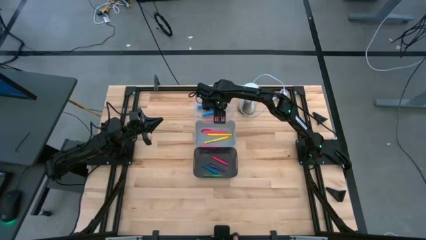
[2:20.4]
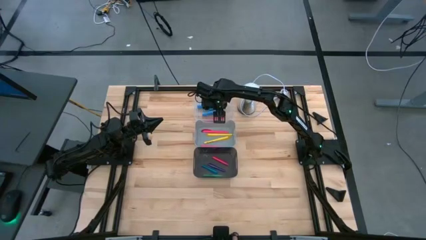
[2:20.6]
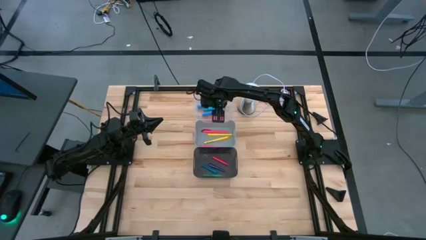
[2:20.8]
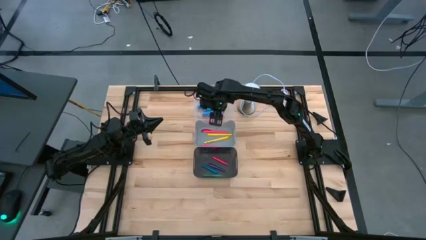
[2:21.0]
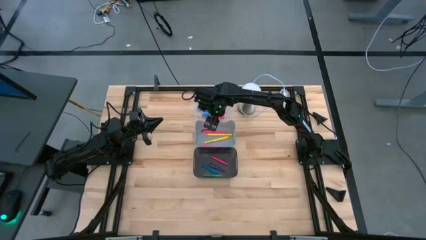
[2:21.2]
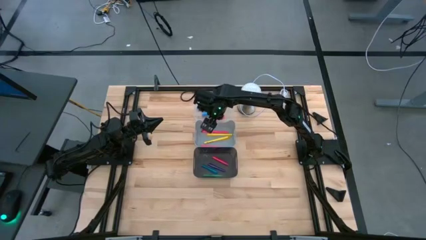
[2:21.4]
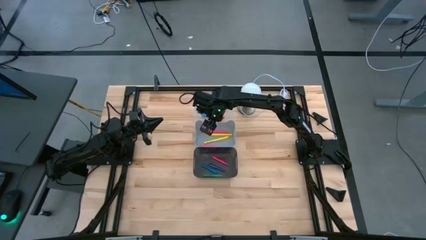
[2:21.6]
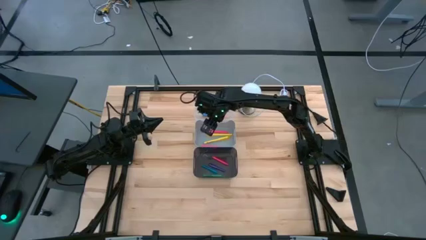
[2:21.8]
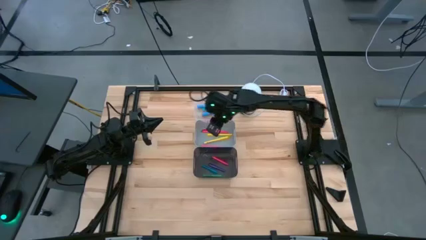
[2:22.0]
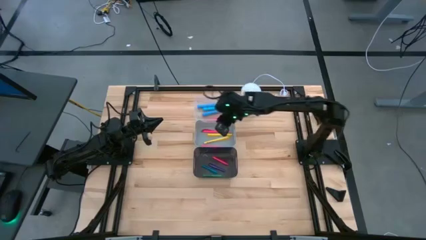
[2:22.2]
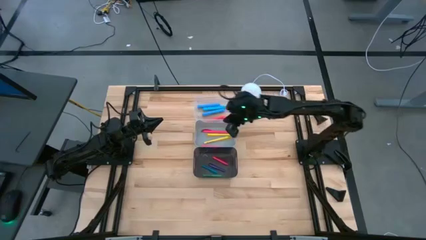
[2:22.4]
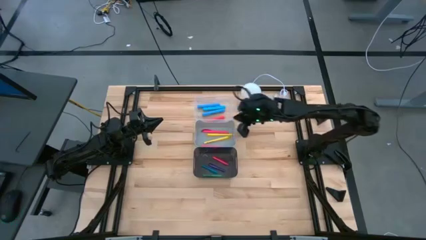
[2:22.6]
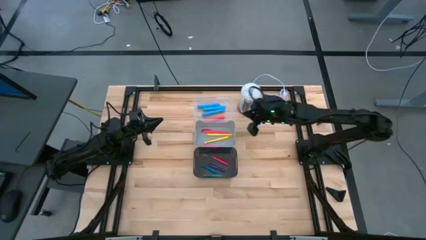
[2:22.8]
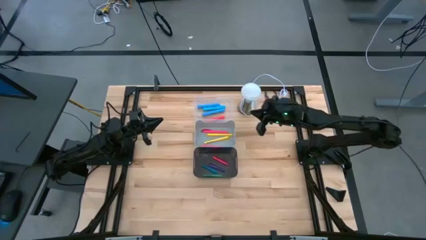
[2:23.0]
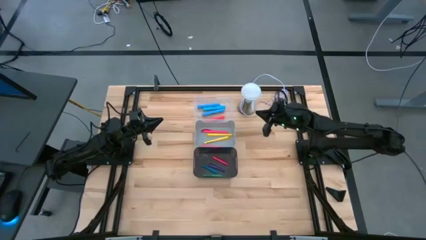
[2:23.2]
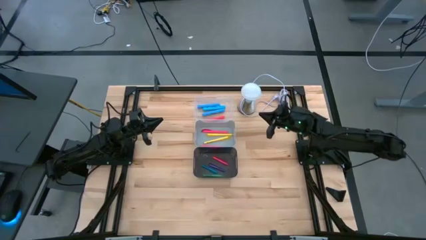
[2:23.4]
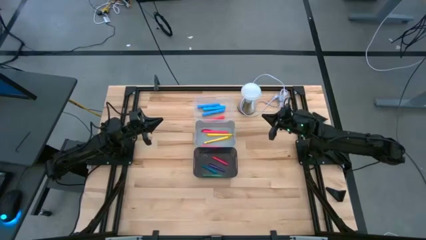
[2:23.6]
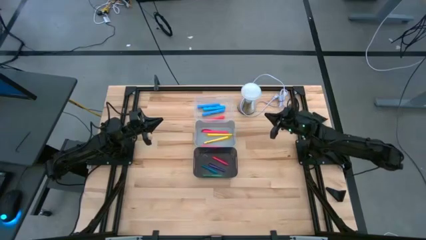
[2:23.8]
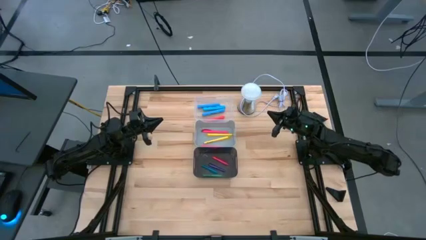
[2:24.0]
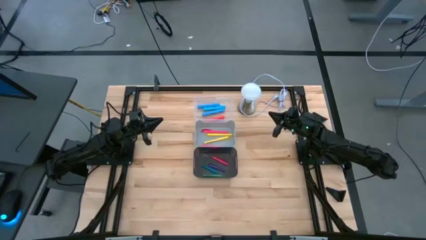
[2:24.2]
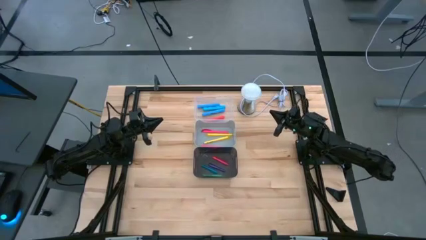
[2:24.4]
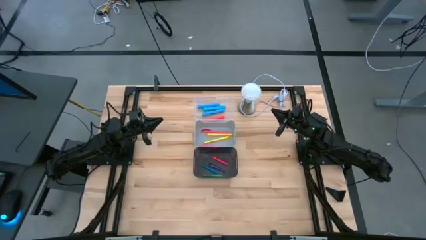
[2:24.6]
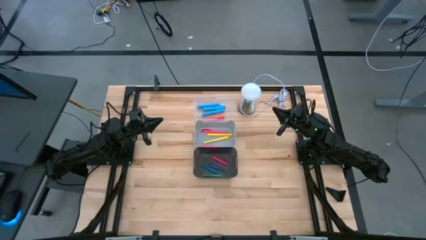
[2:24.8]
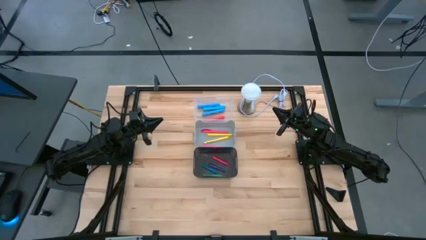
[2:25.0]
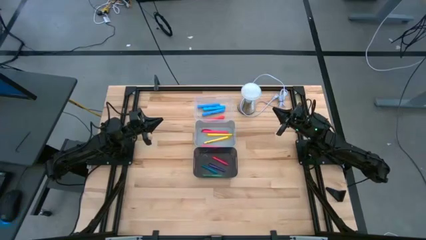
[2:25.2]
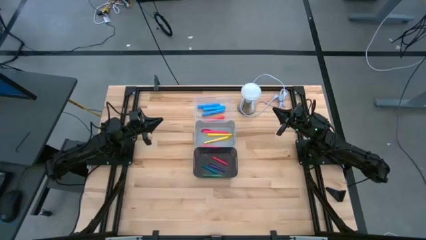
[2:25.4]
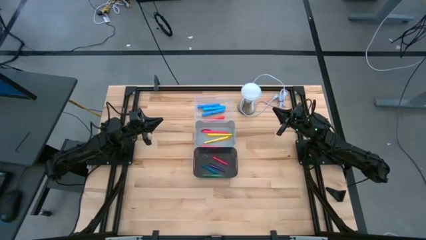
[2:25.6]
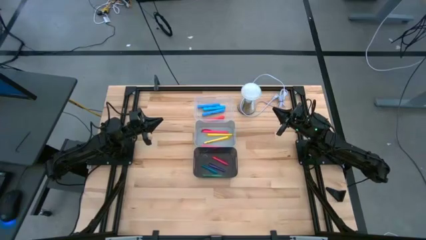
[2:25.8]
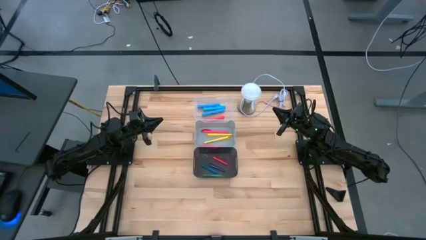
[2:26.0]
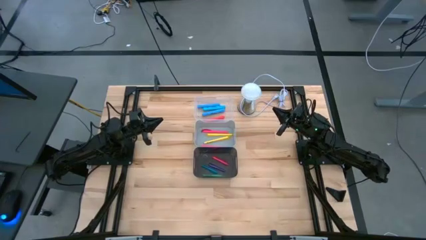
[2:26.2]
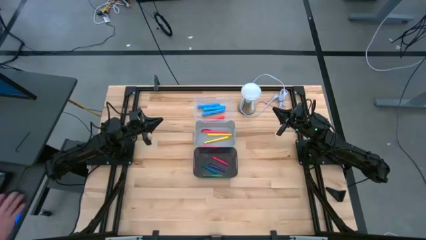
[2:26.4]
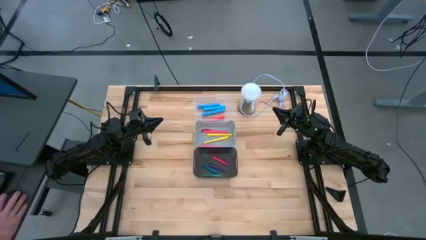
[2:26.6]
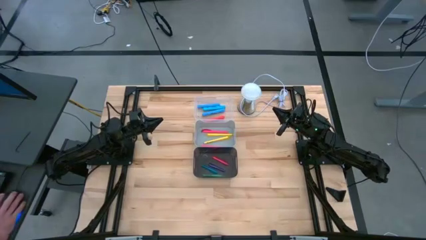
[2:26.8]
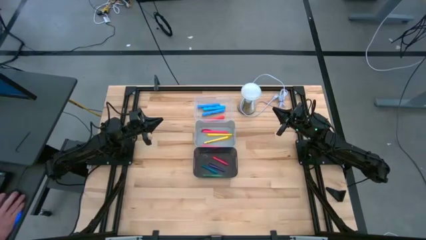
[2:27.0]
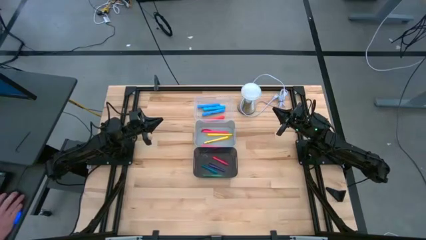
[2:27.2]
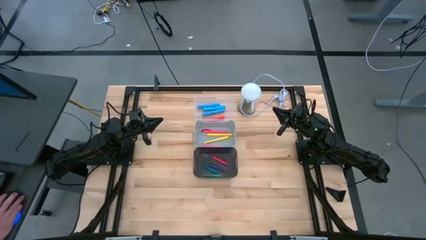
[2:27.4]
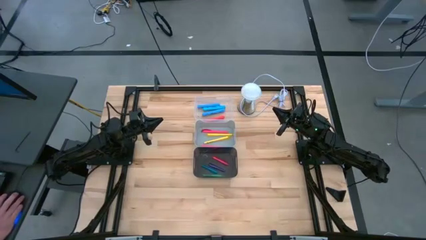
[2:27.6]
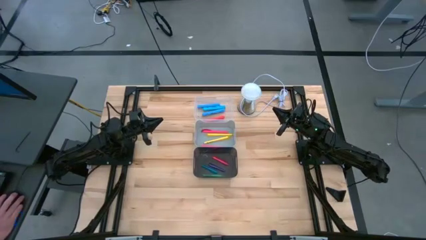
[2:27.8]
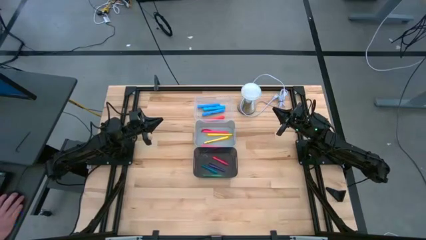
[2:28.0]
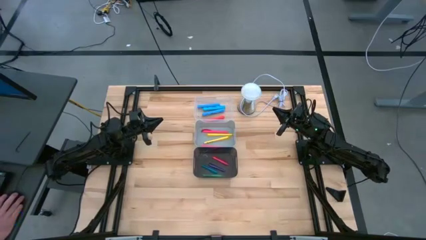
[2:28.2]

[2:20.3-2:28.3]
Task: Pick & Place Markers
Return to Home Position

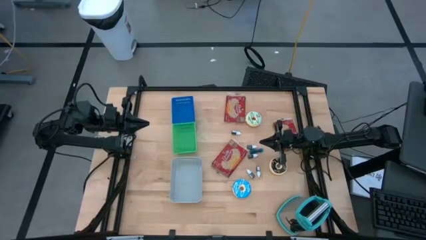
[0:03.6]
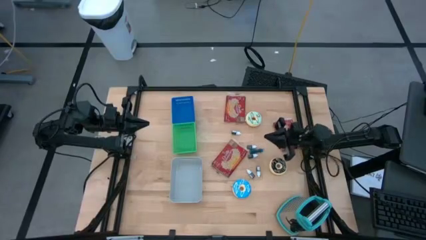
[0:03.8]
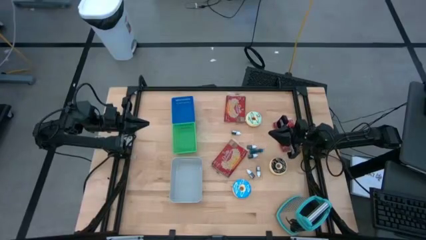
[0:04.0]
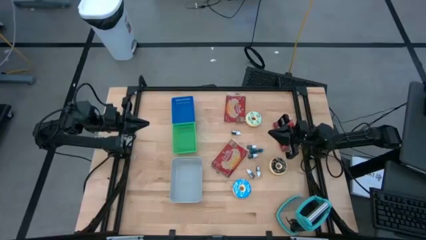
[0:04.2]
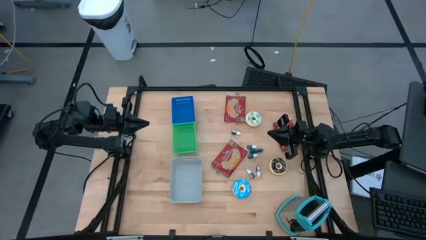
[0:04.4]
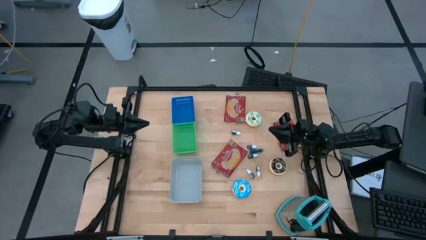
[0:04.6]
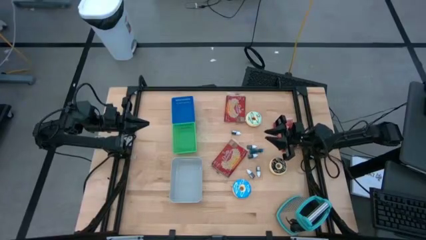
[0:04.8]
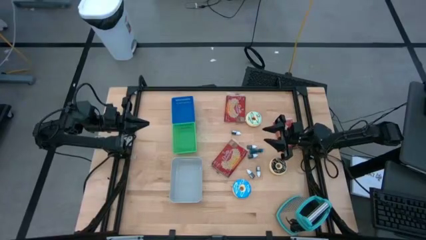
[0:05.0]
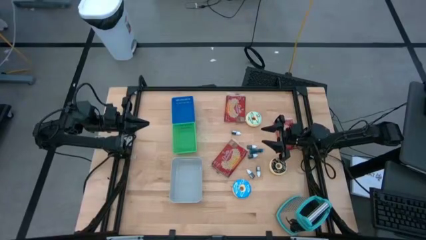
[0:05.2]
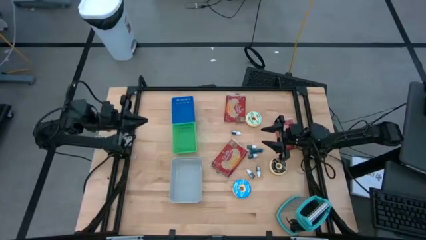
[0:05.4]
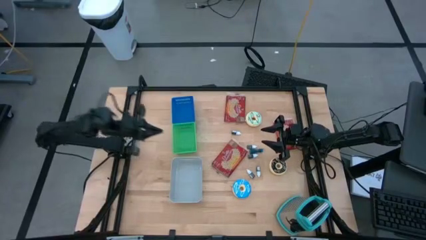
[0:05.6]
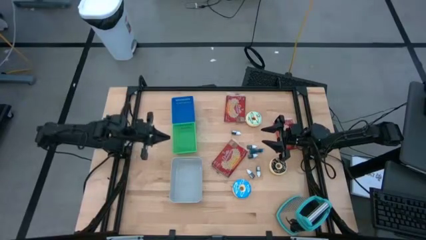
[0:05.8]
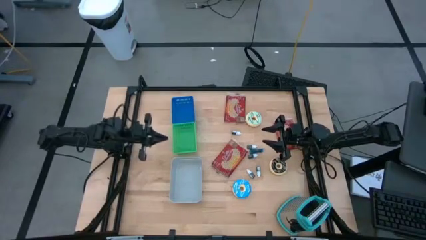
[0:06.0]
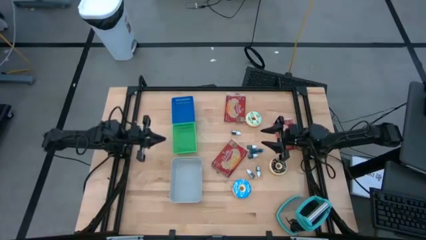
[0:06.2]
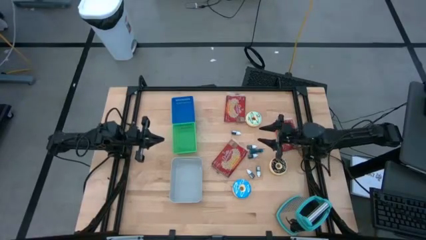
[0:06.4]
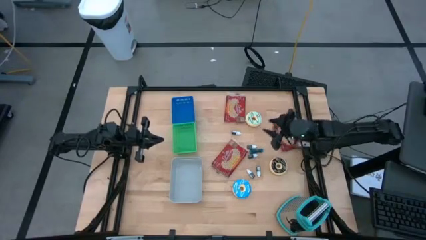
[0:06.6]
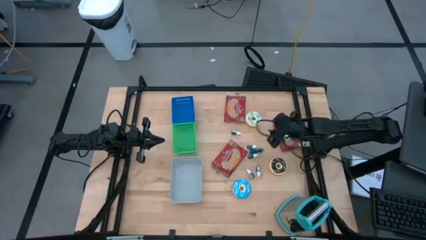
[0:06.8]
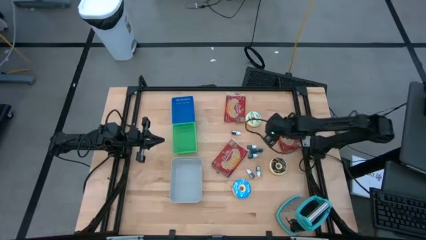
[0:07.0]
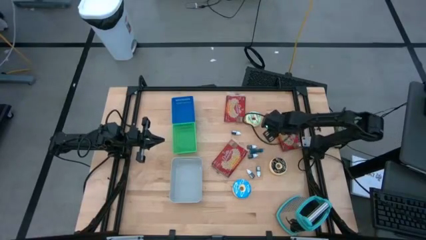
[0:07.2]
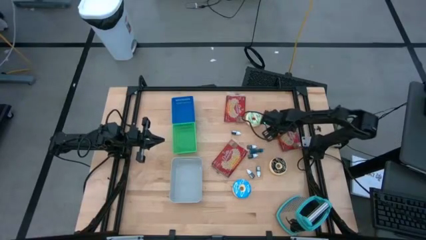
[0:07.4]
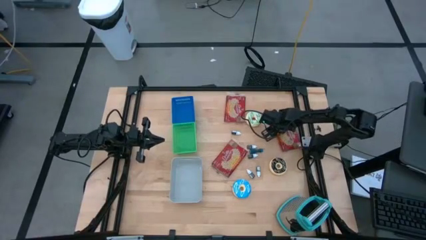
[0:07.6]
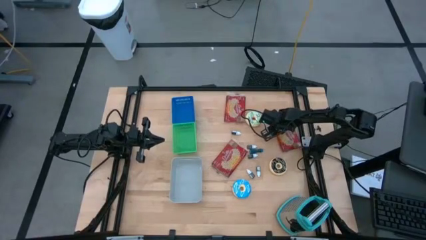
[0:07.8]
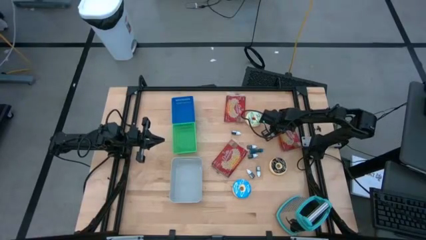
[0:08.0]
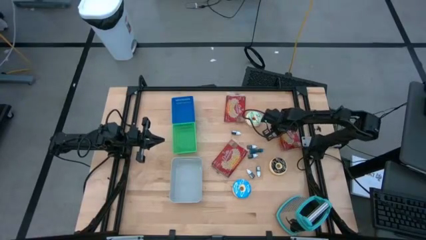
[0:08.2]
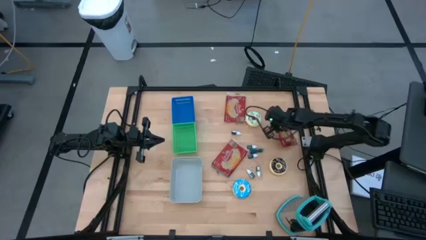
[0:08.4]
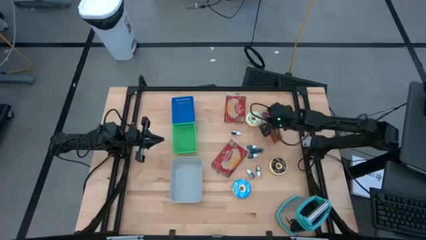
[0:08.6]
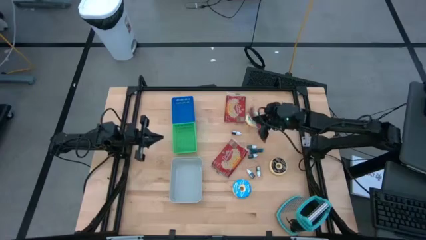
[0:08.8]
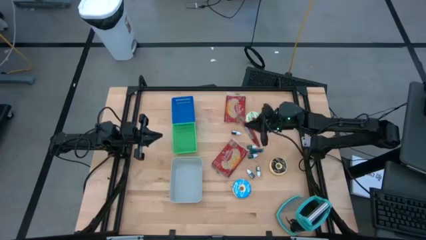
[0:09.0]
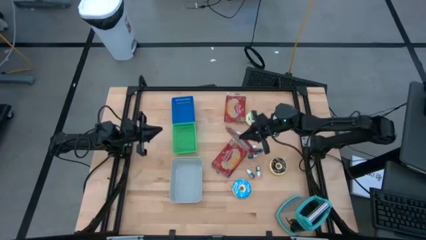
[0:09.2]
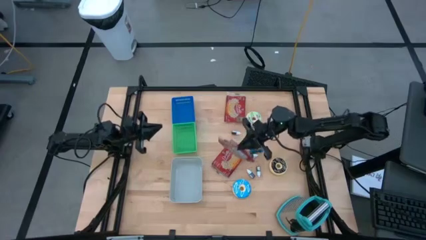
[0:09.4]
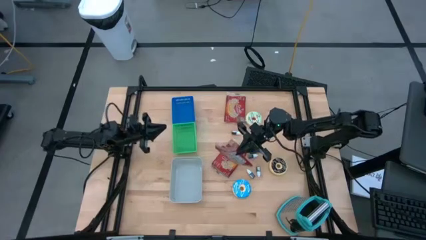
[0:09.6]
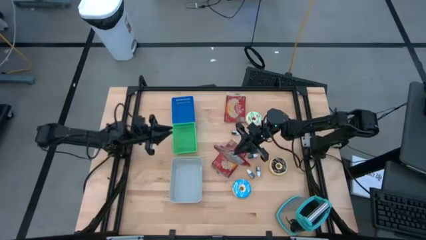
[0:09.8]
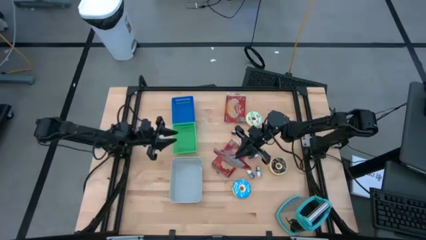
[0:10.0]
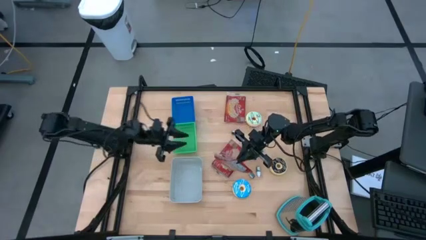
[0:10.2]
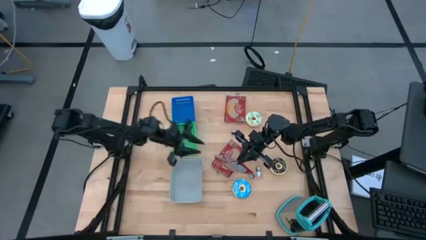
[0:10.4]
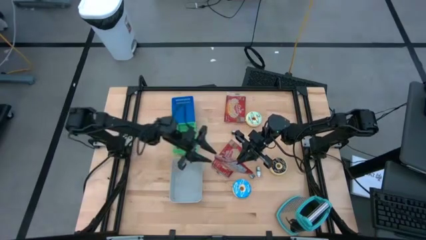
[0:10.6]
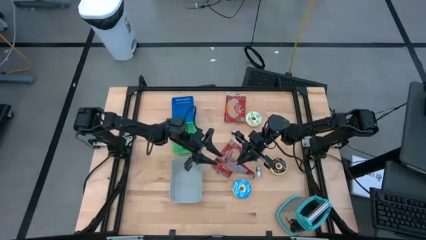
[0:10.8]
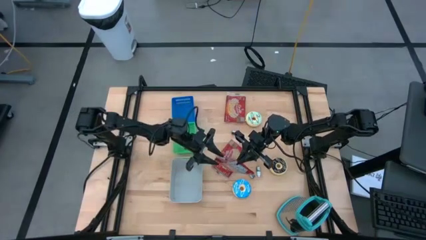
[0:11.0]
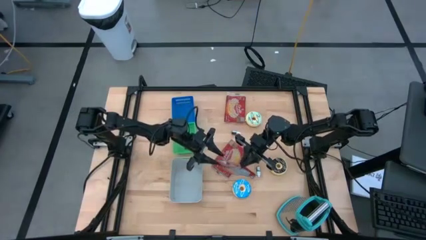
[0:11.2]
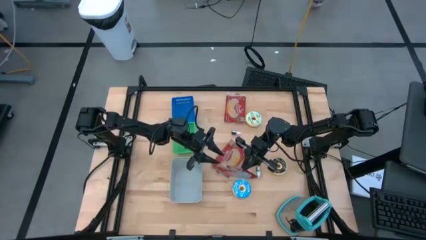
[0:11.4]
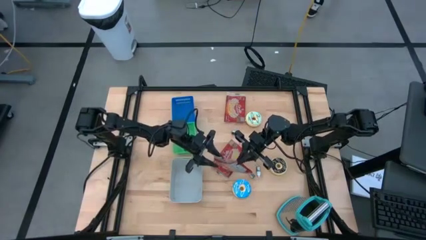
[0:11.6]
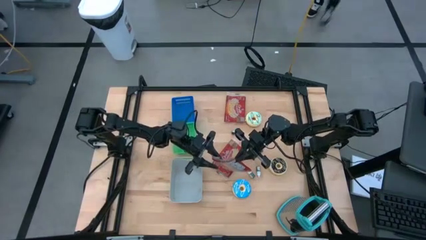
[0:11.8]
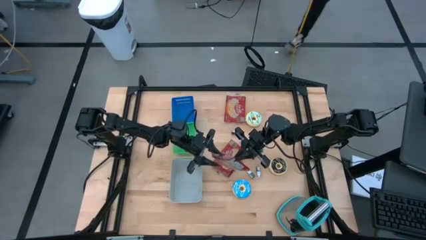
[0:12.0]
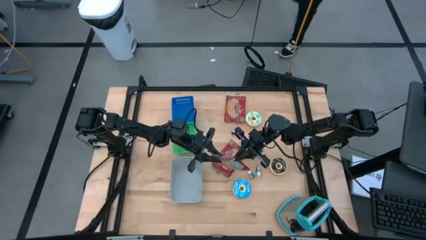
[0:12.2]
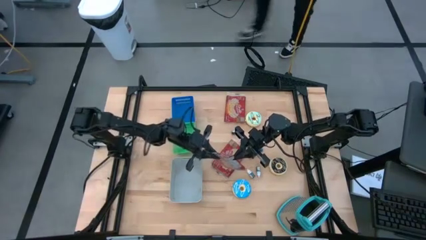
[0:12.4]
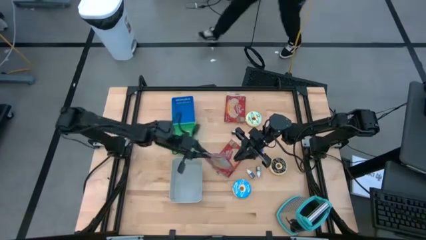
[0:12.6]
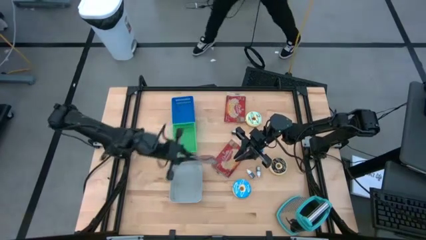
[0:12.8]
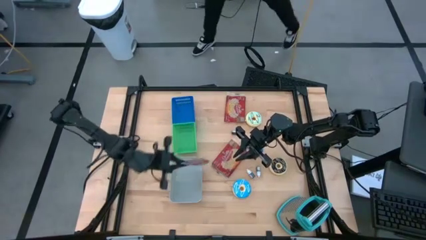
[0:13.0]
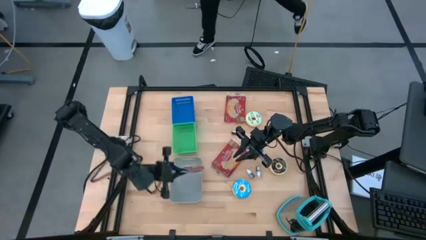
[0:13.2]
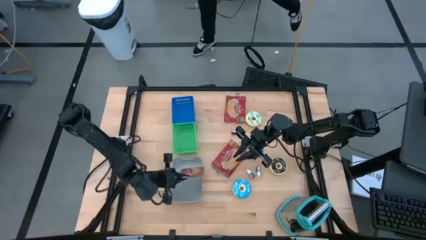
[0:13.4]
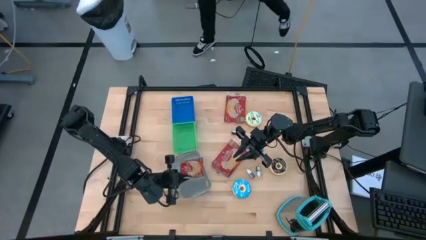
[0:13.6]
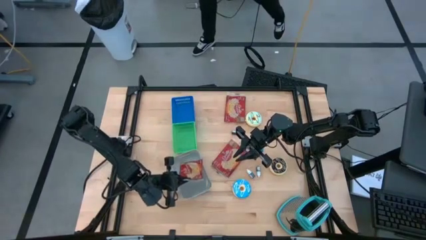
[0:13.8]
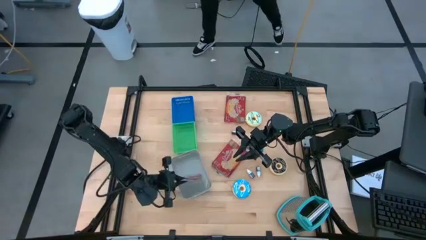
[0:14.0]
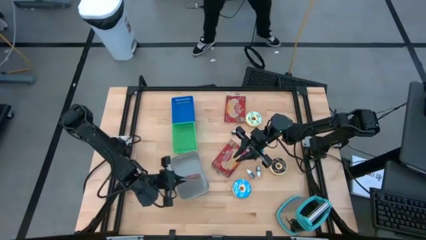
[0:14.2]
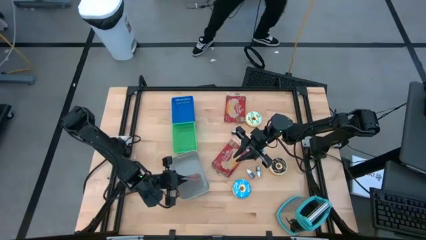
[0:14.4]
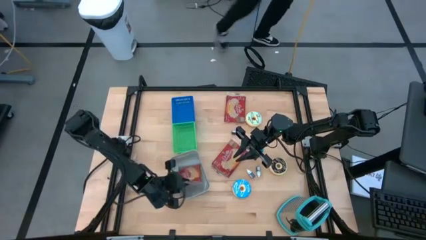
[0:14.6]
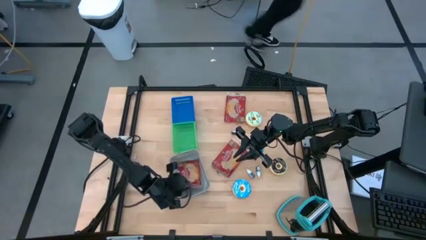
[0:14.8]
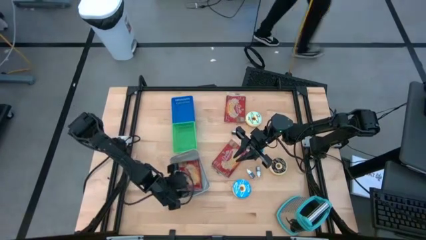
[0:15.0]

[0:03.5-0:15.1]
Task: Pick & Place Food Item
Put the right popcorn pack into the gray bin
